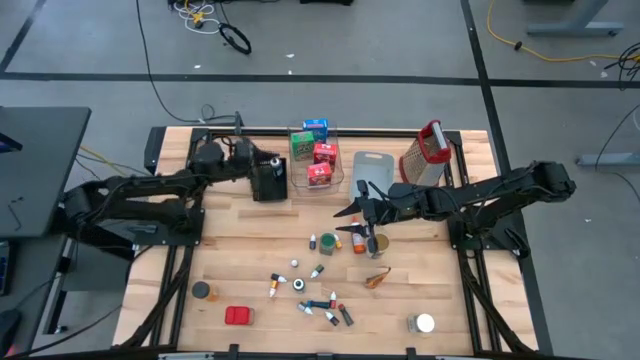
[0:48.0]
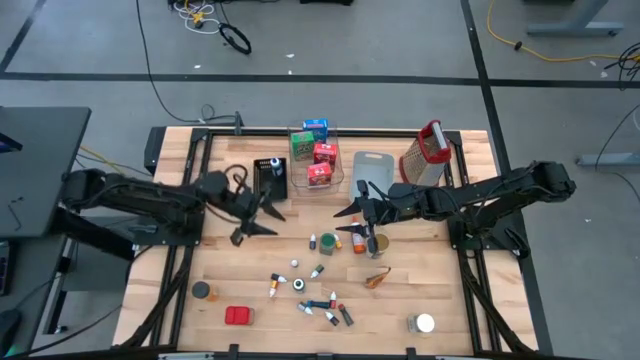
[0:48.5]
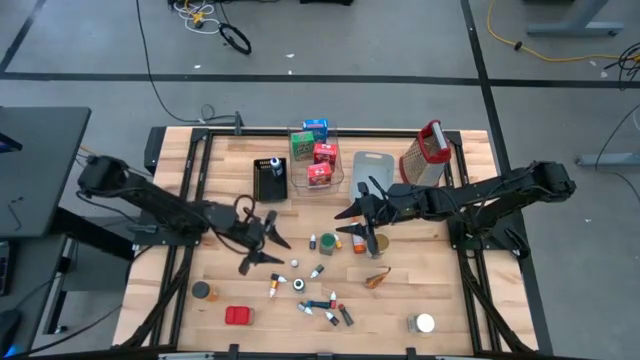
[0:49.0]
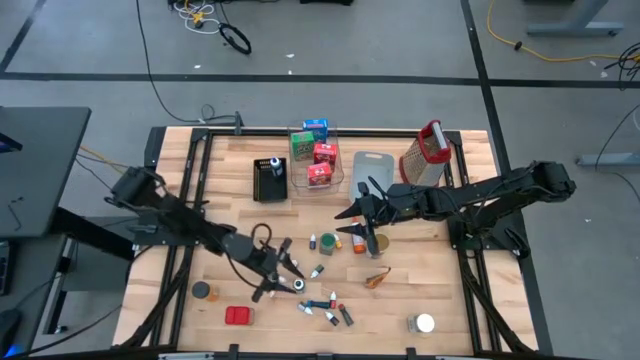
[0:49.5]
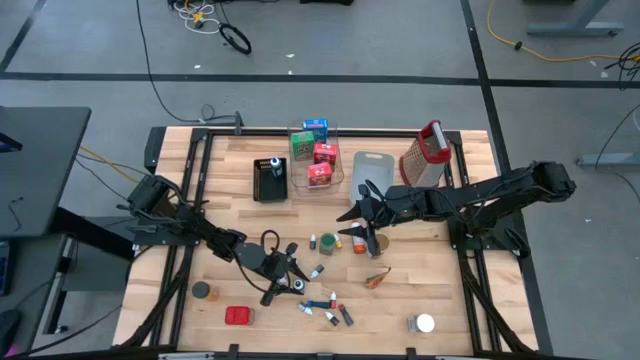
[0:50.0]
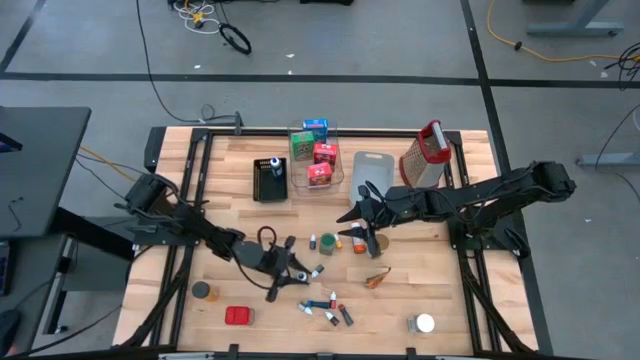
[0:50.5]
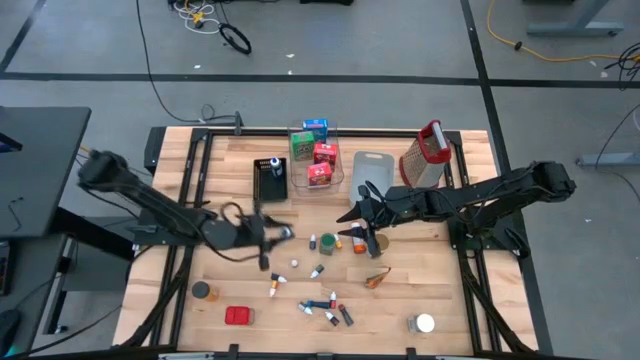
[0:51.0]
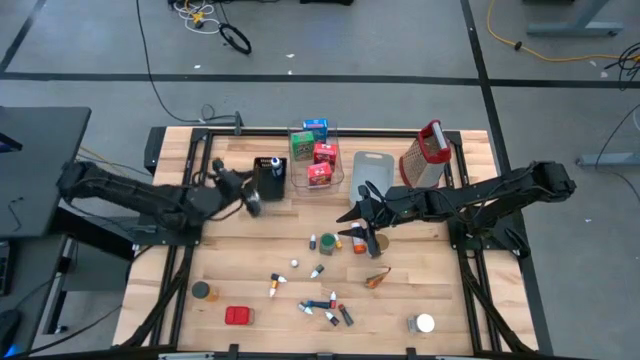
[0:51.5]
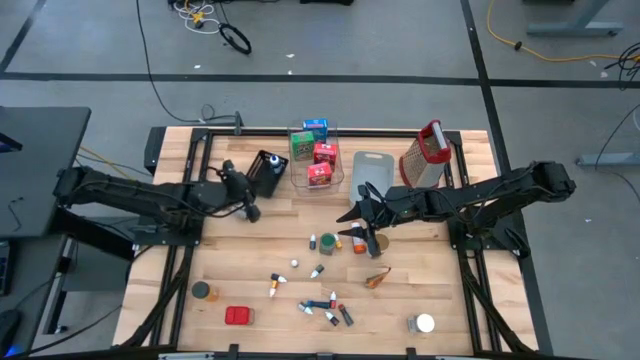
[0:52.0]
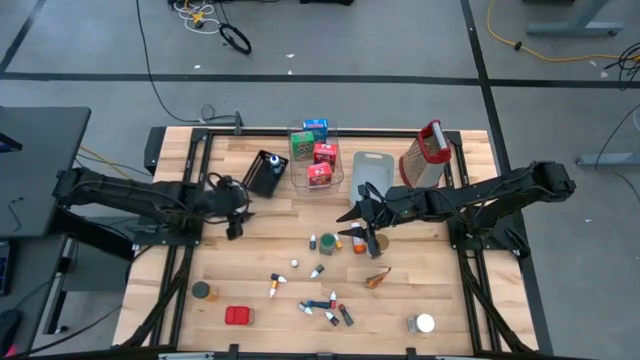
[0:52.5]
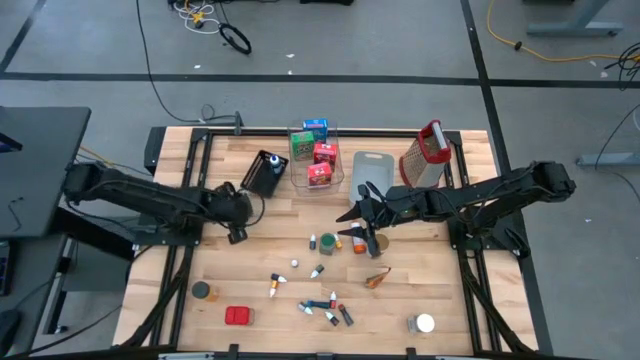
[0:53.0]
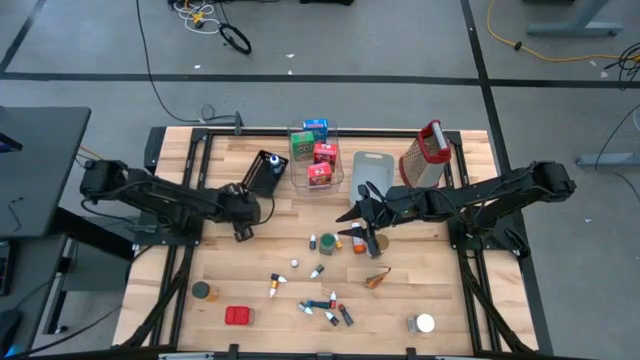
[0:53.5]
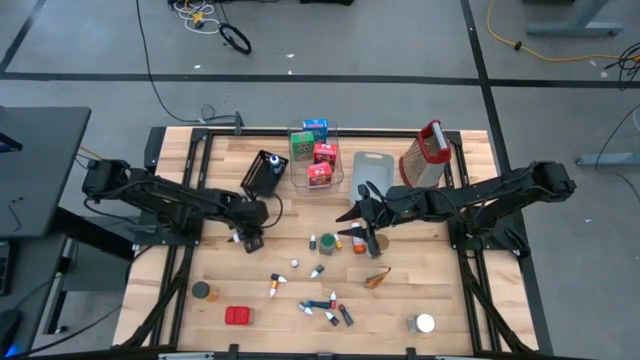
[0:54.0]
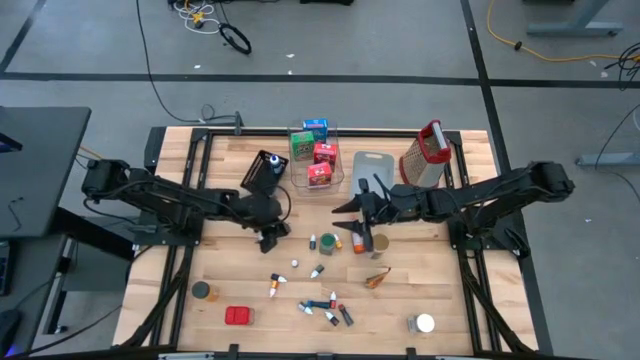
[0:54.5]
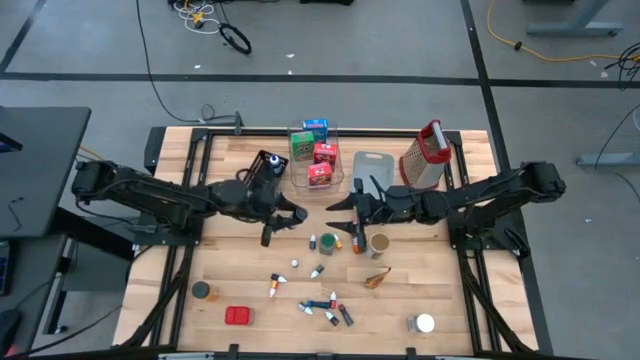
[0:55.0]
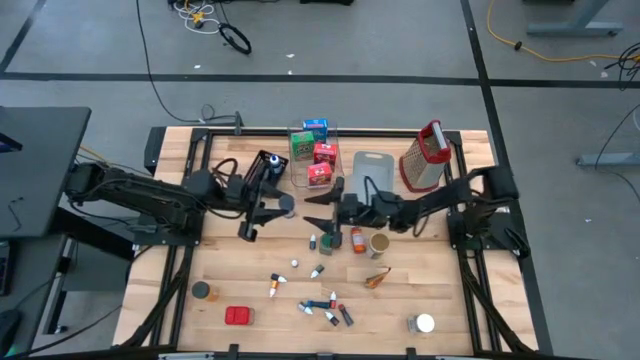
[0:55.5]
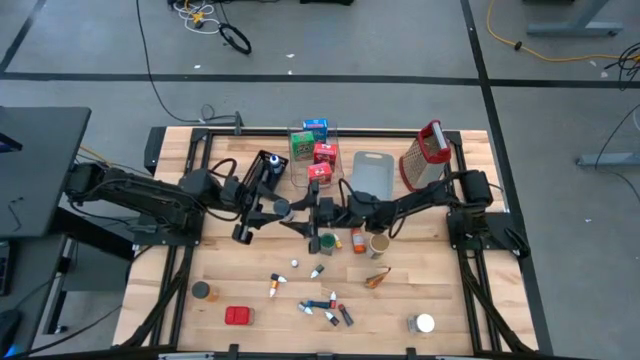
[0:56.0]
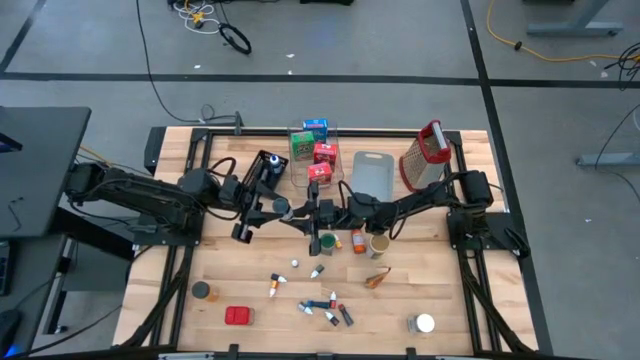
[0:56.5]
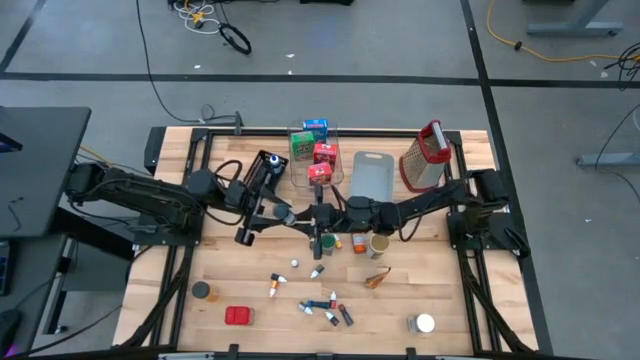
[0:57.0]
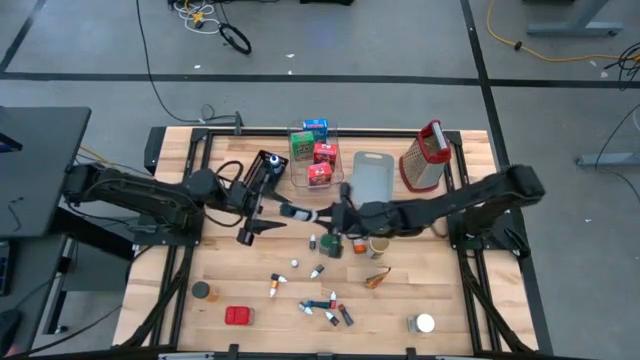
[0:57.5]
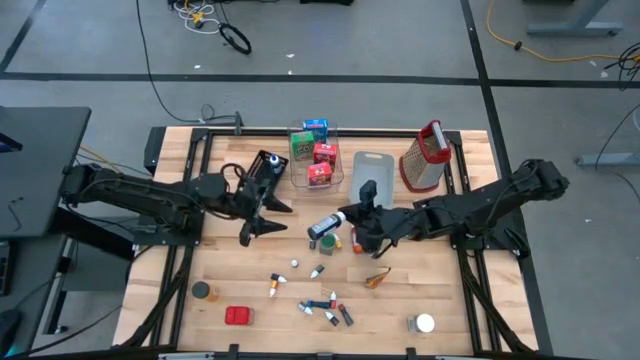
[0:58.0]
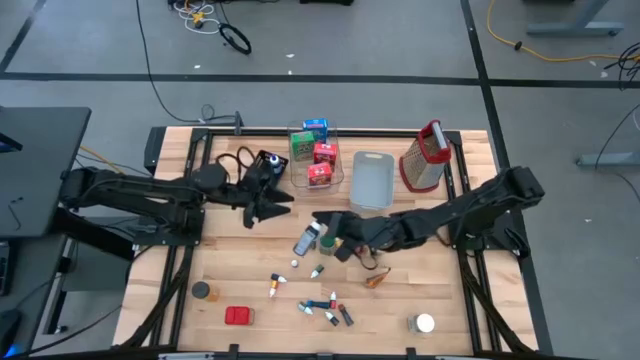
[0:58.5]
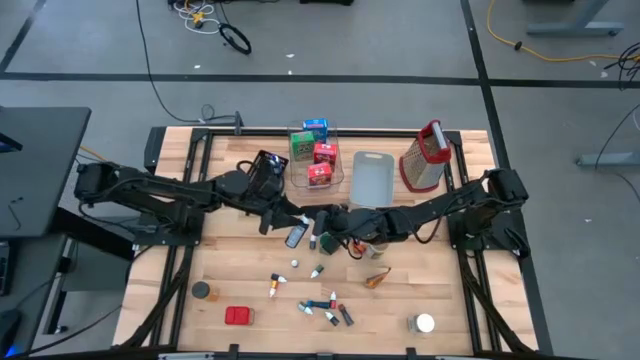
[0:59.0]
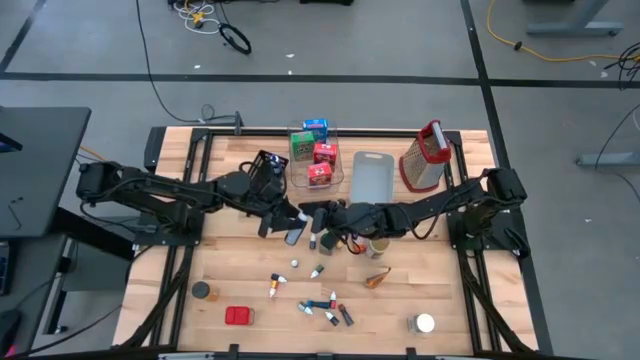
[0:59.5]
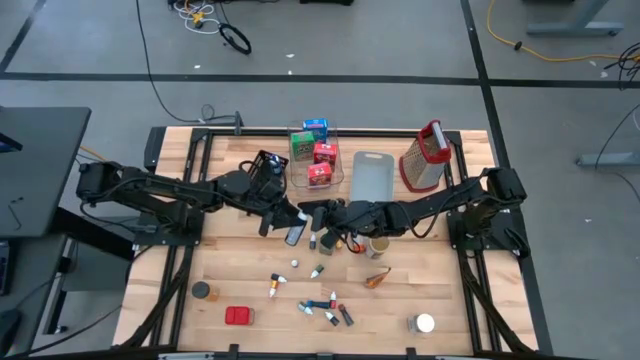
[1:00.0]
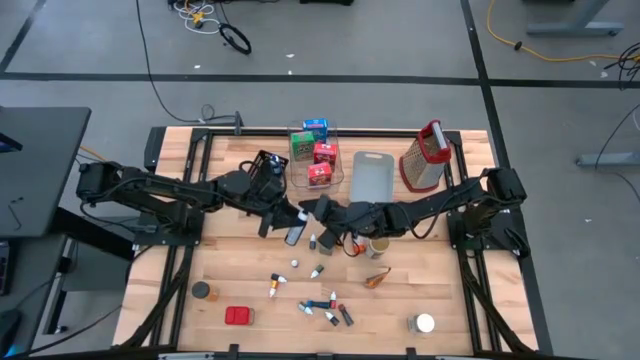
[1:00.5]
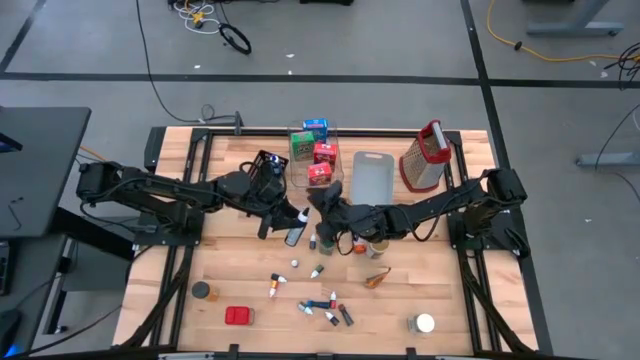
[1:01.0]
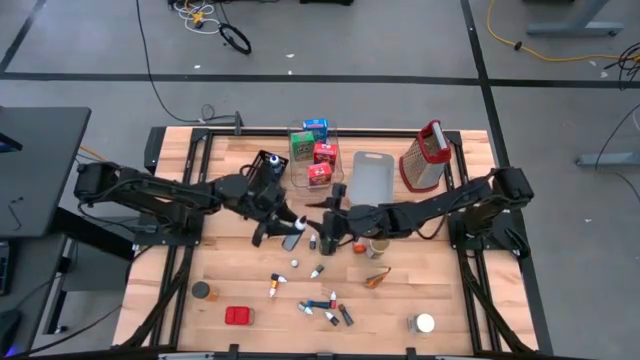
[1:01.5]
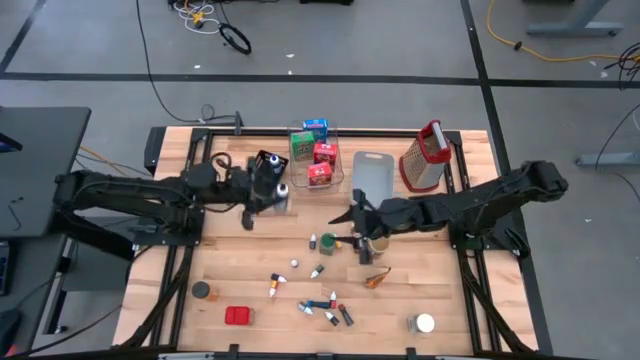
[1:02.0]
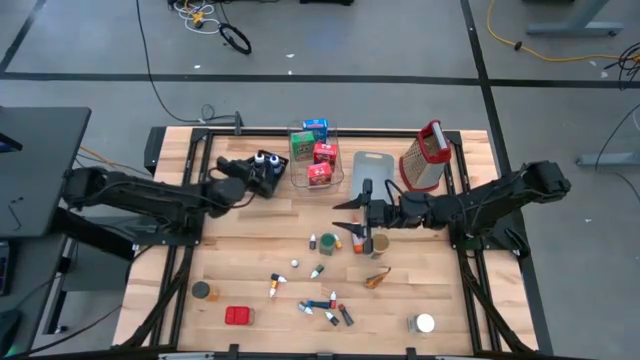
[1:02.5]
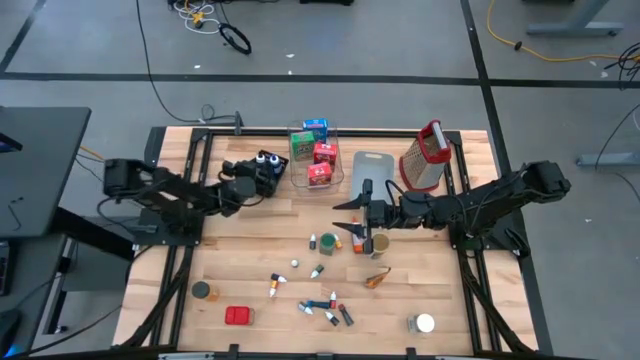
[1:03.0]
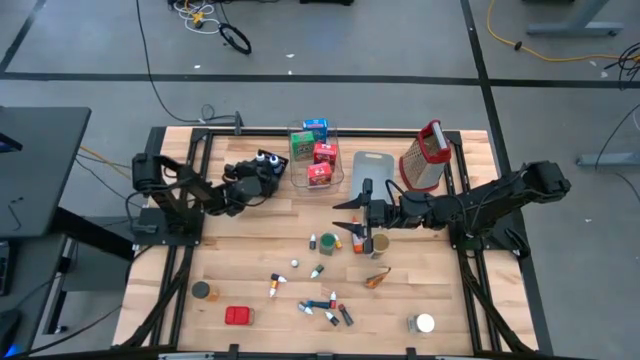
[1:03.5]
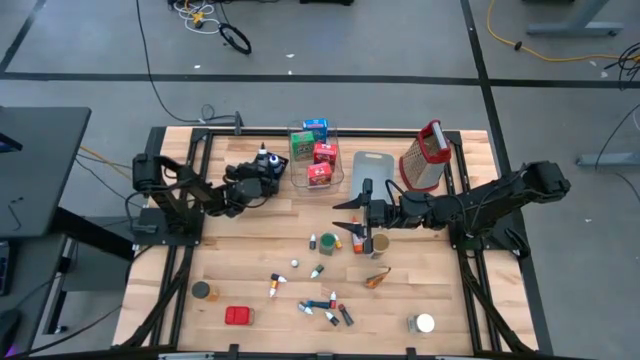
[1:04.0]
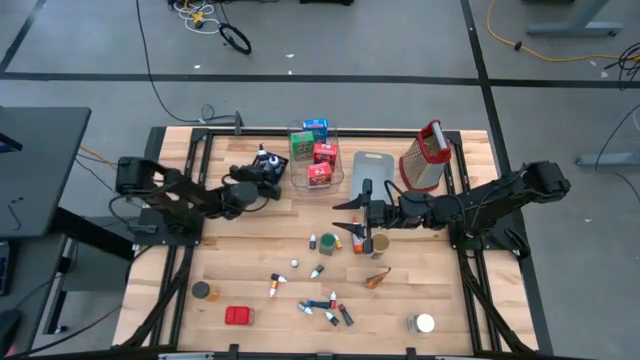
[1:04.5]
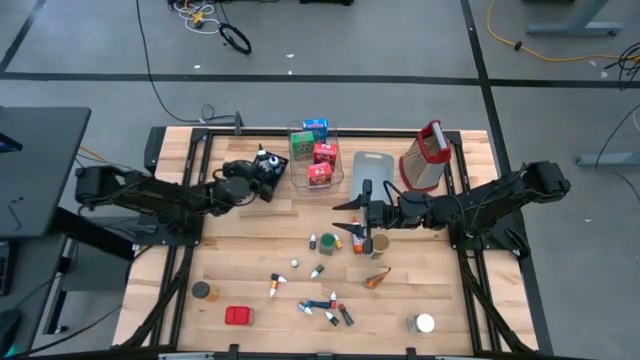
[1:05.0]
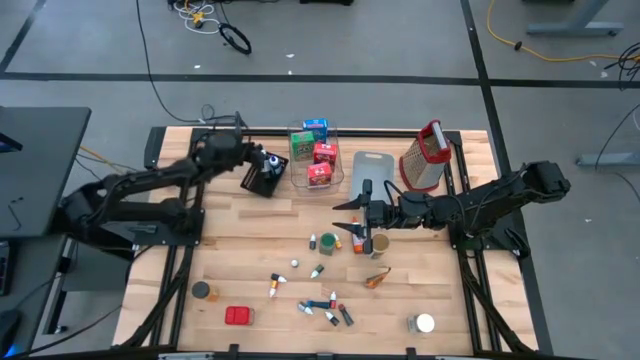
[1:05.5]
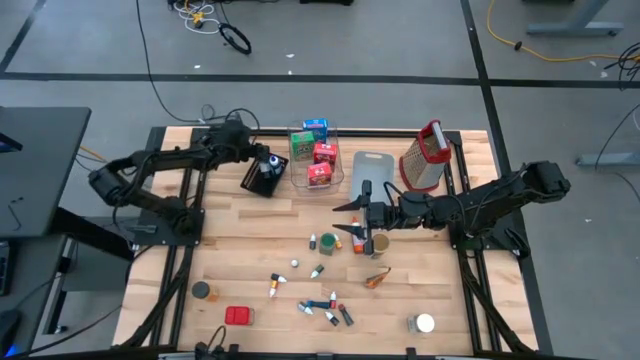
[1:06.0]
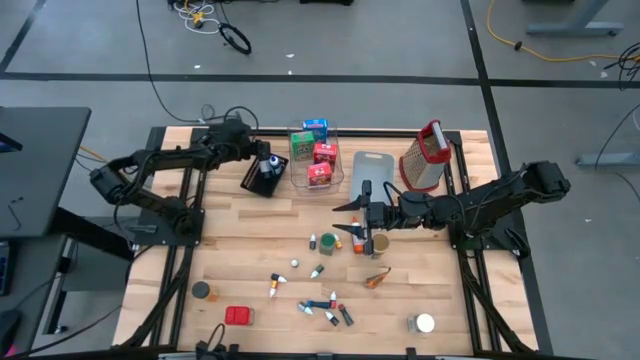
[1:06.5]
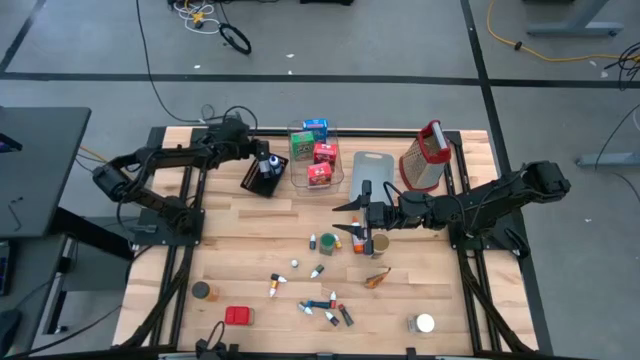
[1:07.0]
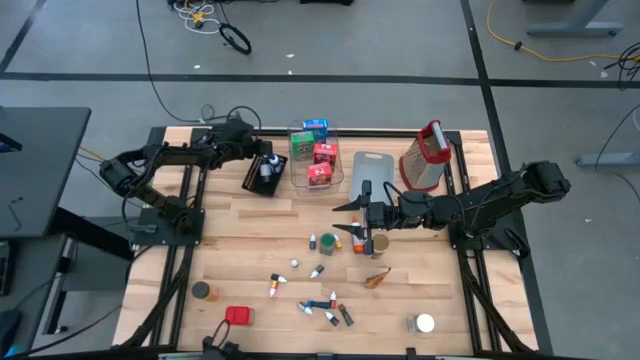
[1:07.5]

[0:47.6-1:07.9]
Task: Pick & Place Kitchen Items
Put the large black food coloring bottle into the black bin

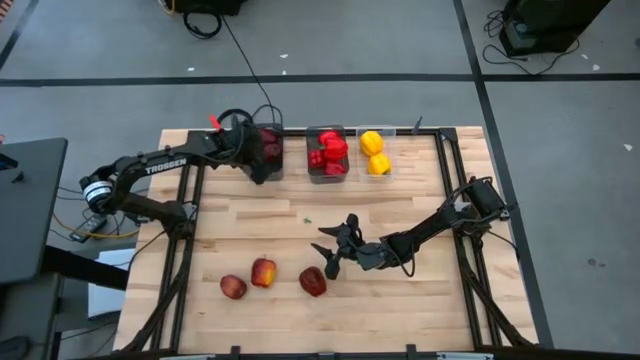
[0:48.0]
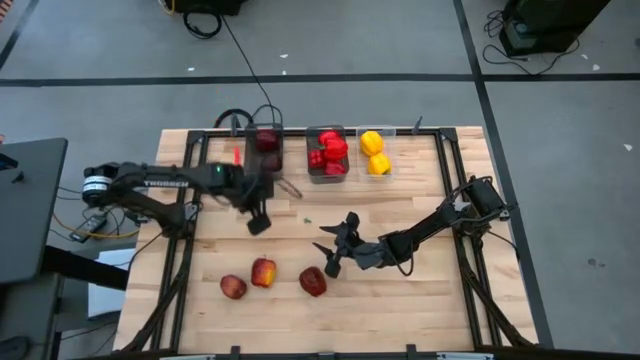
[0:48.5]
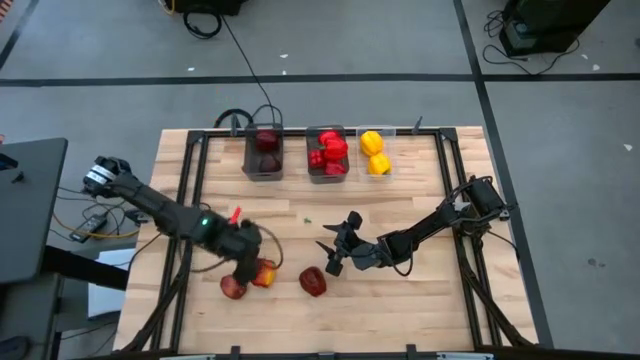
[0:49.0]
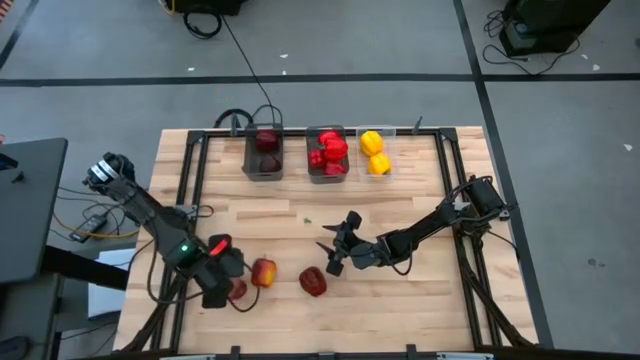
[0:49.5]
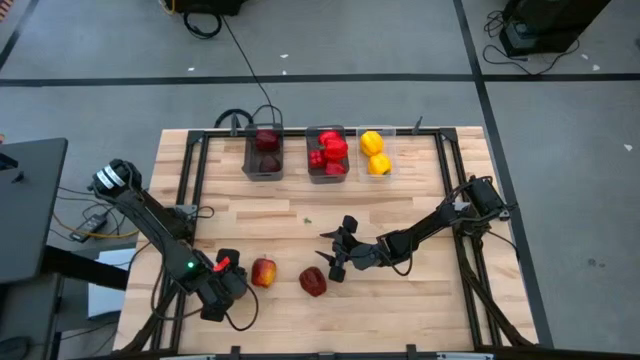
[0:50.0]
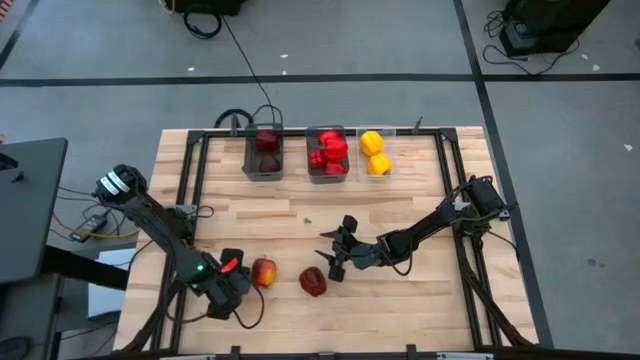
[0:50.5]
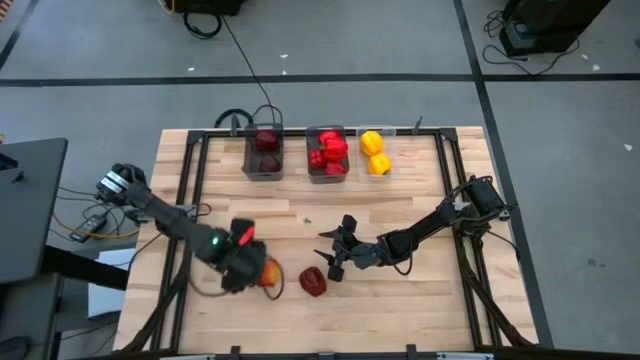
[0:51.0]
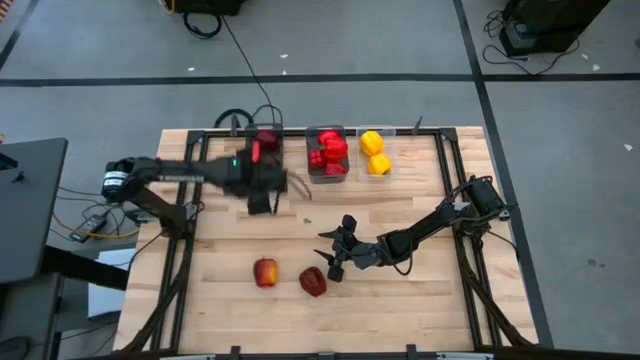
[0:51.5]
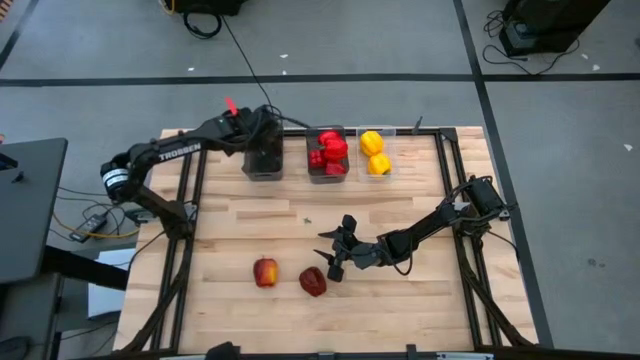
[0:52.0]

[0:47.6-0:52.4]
Task: Sort produce into baskets
Put the dark red apple into the left black bin
